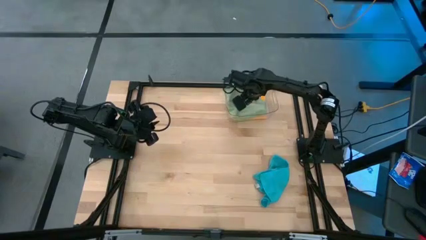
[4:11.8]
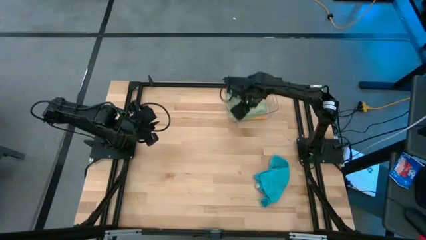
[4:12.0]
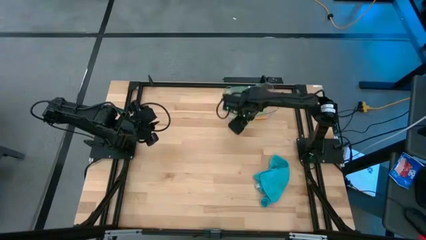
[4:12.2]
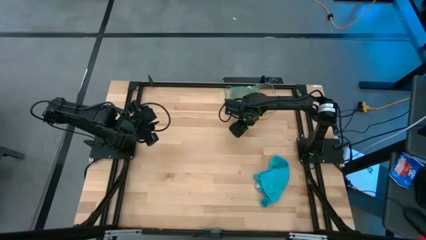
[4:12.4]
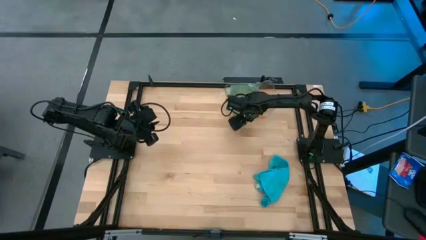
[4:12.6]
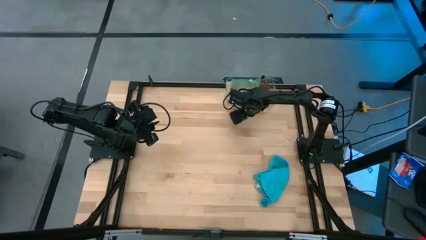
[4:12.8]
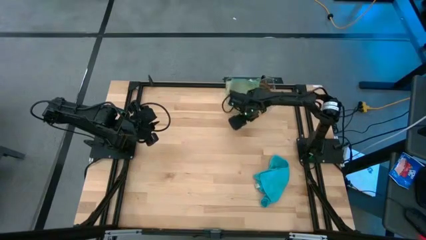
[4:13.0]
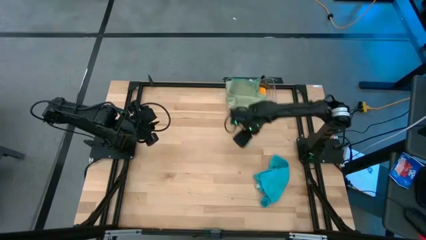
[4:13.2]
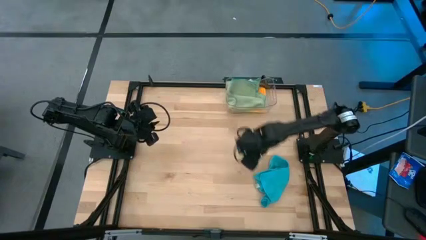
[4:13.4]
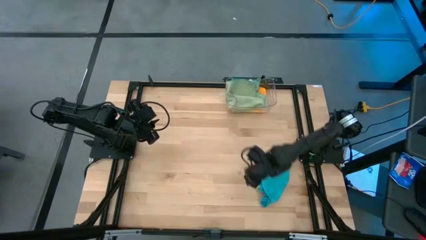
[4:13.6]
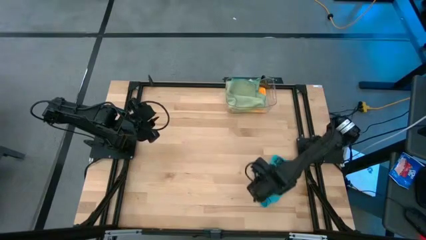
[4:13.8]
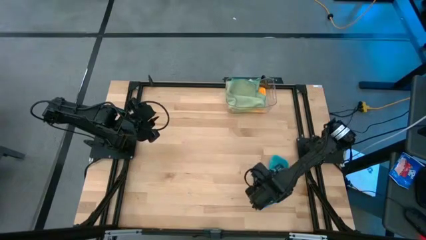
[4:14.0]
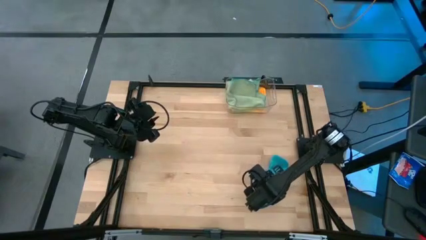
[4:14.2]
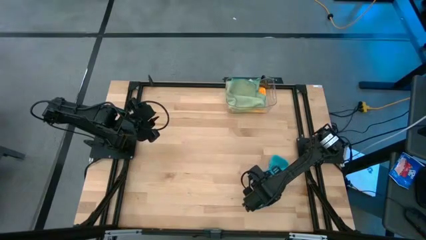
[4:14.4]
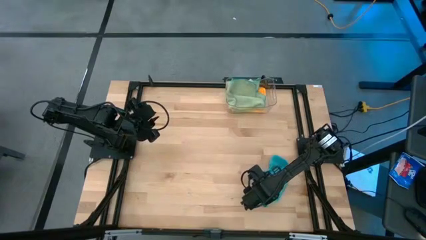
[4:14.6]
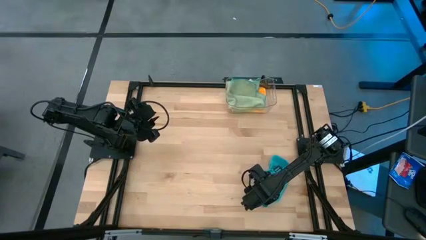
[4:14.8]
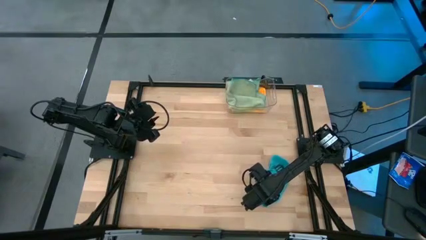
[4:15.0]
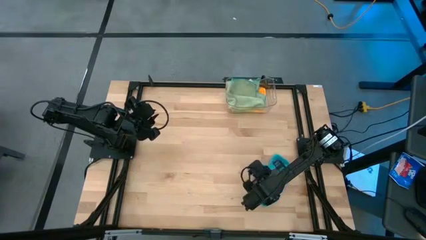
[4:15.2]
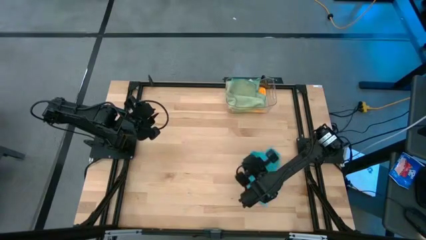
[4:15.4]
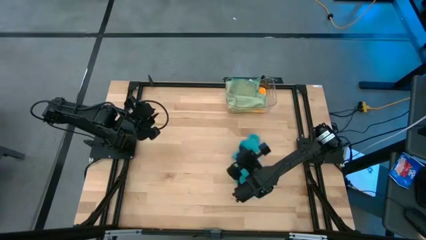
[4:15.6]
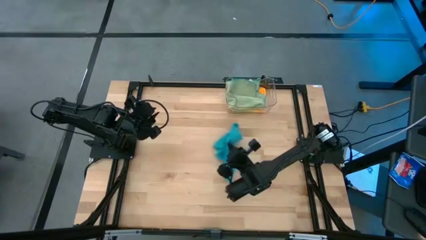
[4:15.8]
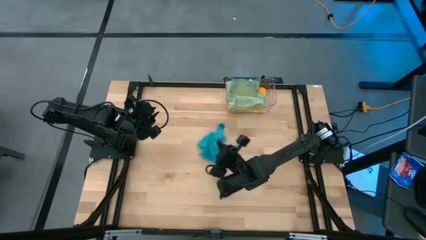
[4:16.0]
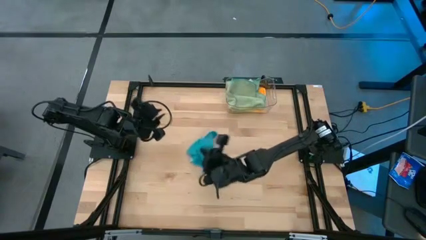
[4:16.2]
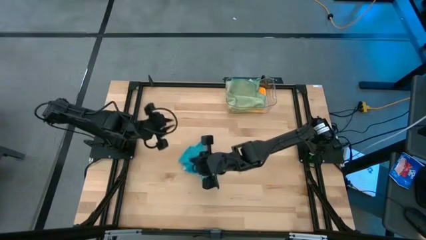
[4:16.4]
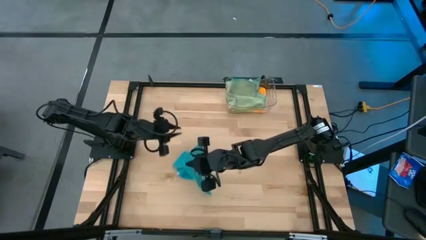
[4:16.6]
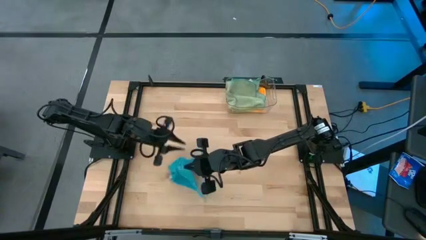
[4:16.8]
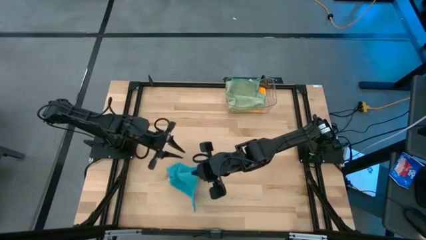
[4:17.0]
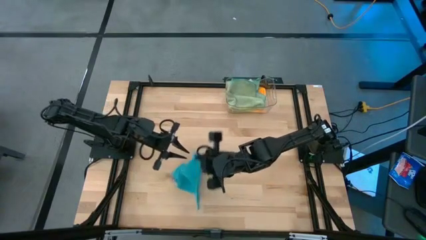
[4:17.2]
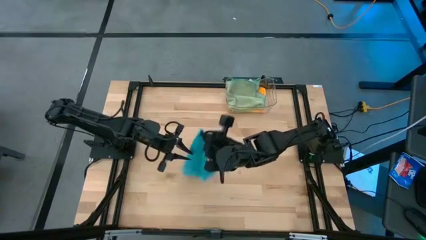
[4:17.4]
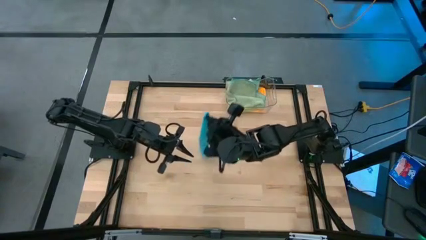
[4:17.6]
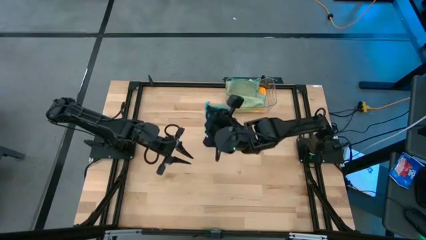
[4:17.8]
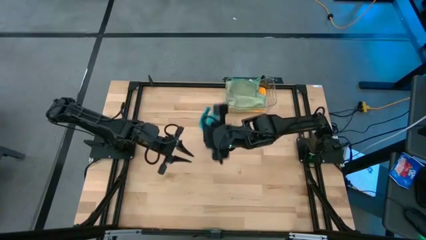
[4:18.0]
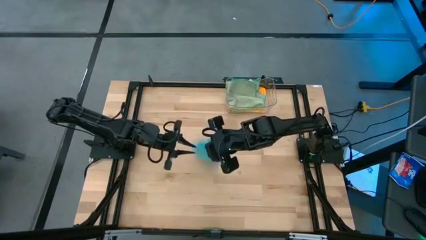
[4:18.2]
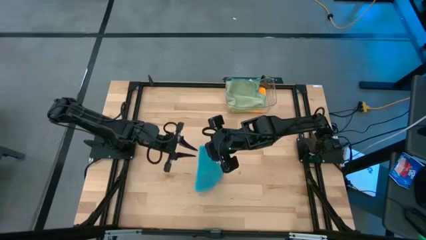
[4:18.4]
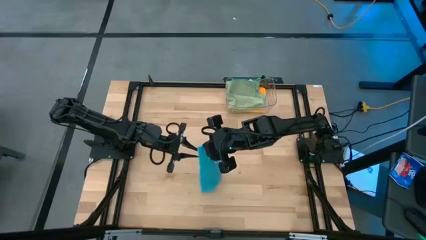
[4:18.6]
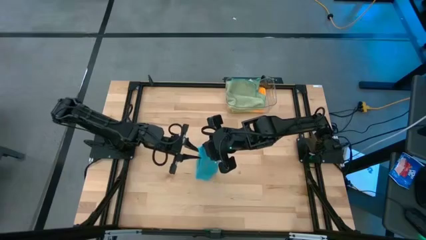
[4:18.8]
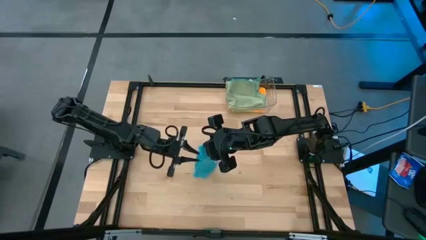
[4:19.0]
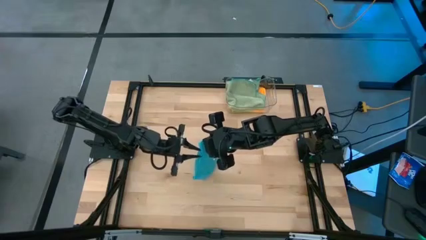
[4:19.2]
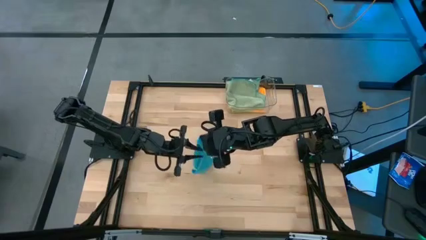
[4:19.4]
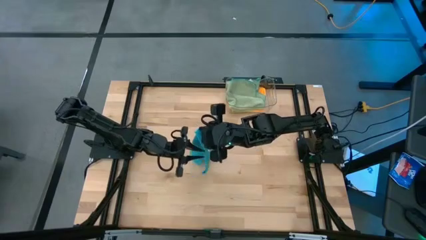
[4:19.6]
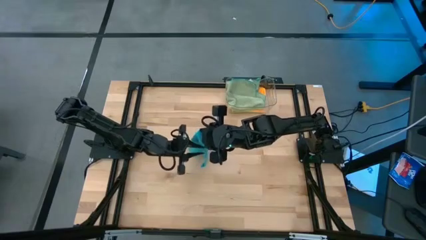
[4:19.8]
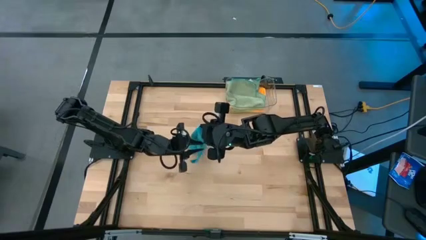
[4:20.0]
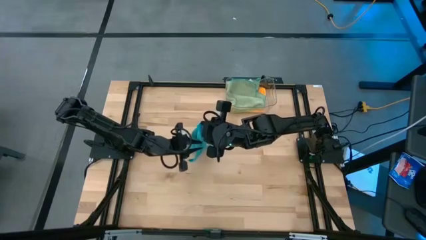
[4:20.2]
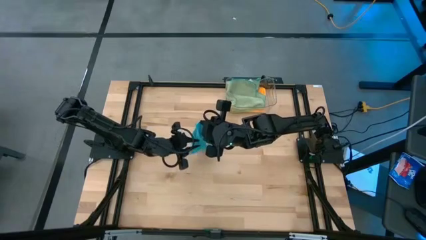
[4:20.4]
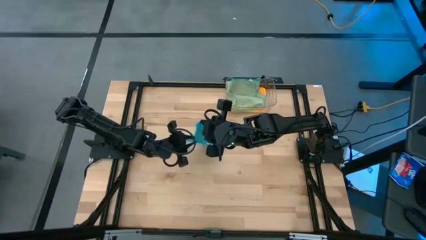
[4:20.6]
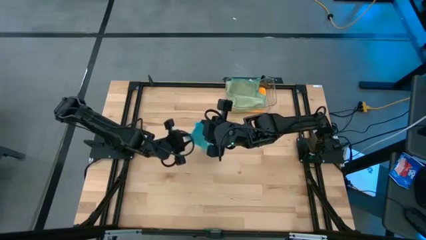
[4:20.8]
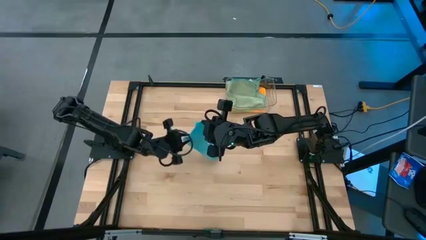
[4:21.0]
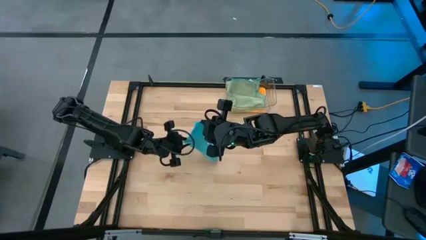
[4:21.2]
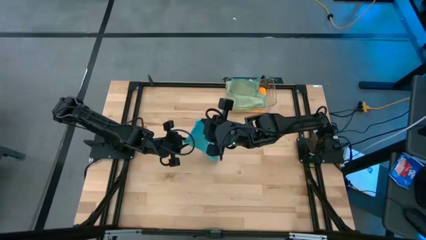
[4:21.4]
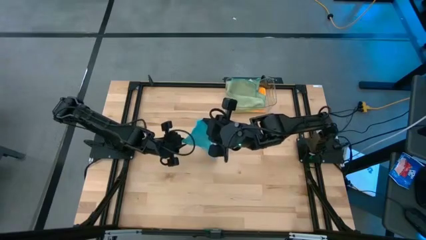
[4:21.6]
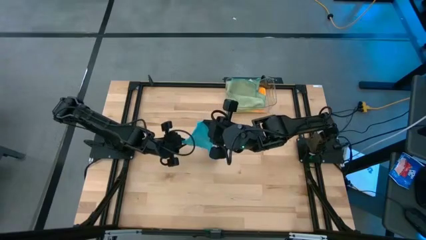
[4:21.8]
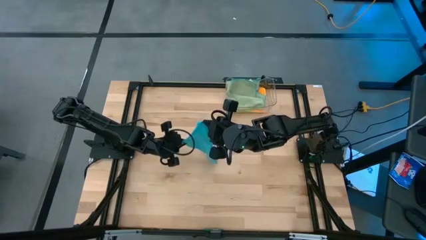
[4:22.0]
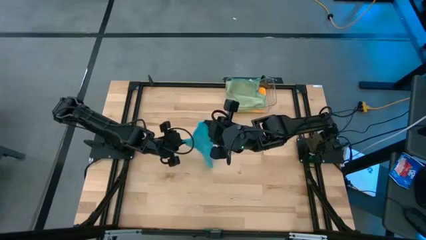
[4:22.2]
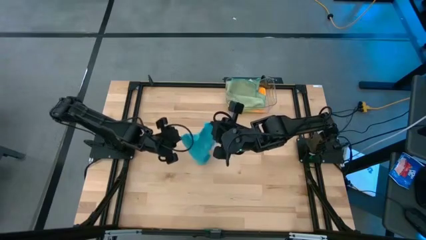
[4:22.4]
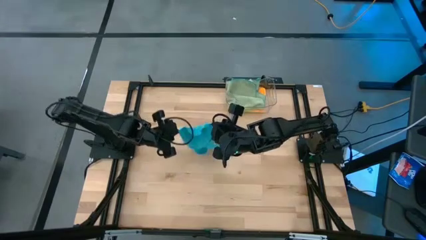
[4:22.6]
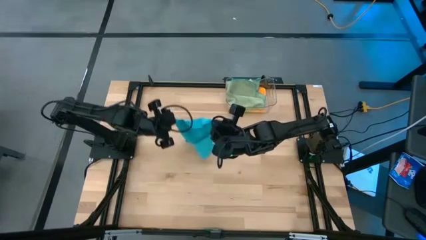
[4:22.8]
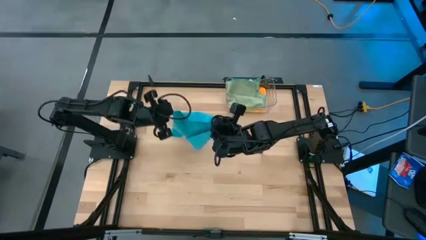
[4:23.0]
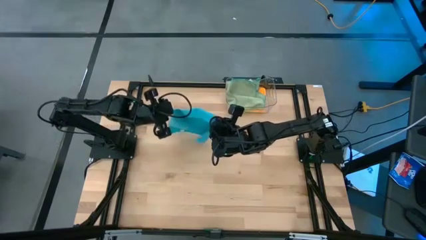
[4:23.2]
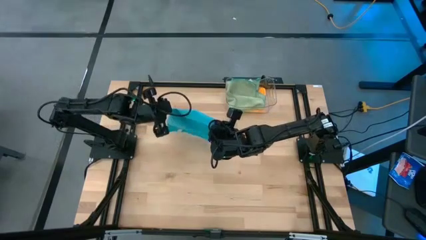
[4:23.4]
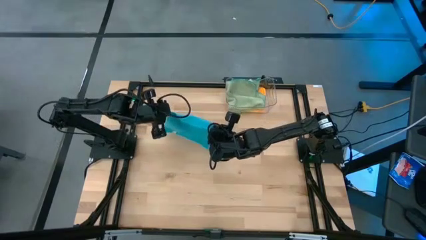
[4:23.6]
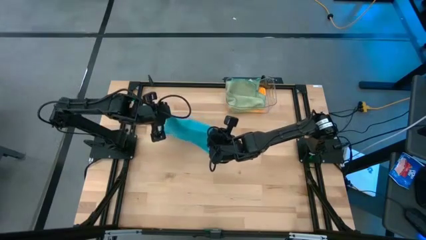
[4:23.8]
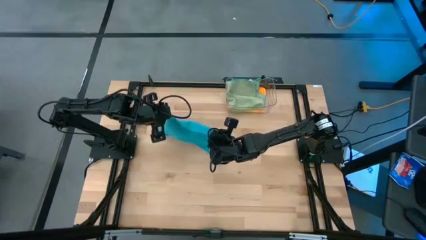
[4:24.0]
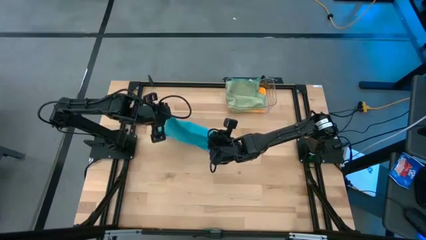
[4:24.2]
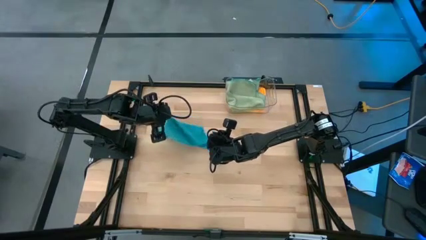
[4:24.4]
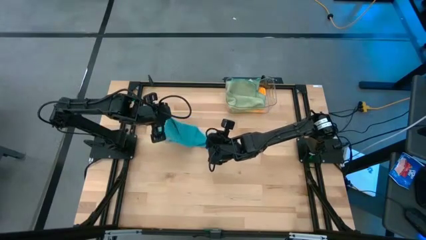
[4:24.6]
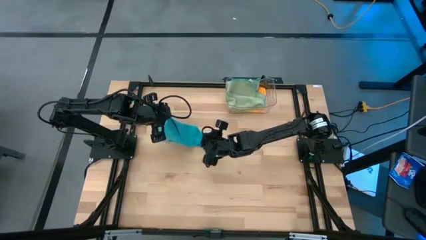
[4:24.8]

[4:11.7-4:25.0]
Task: Fold microfiber towels
Fold the blue microfiber towel

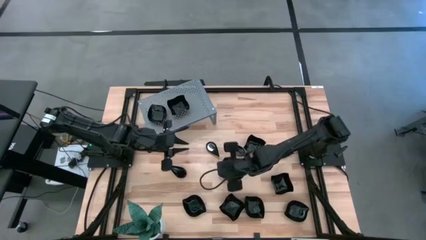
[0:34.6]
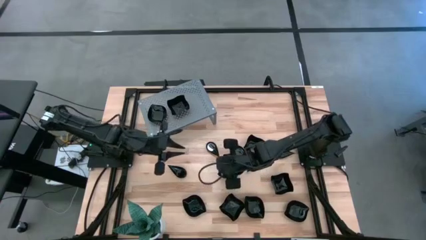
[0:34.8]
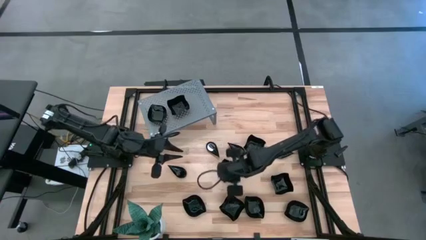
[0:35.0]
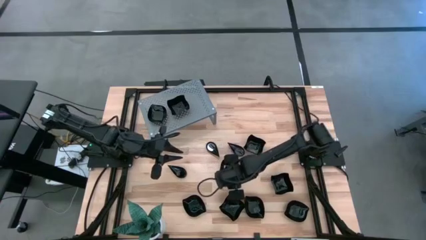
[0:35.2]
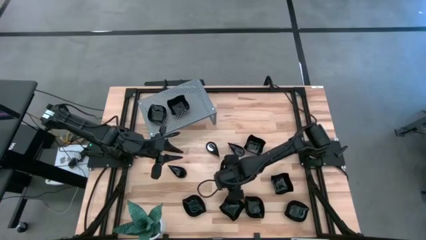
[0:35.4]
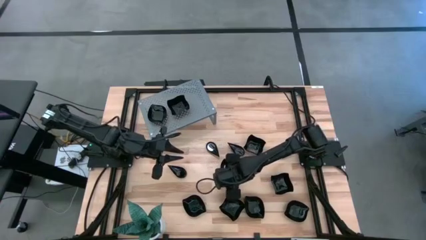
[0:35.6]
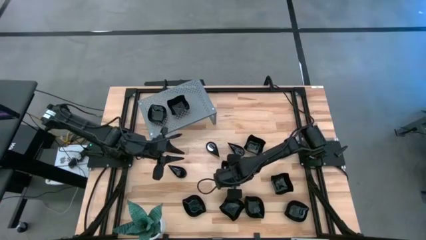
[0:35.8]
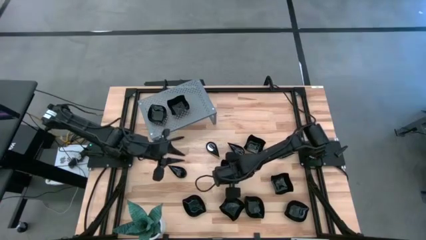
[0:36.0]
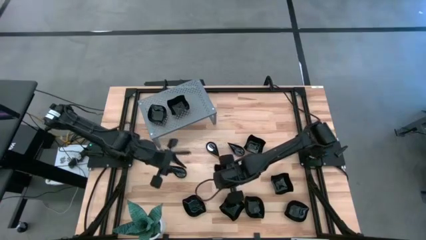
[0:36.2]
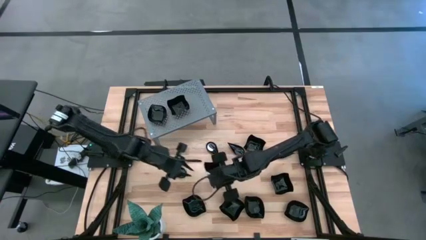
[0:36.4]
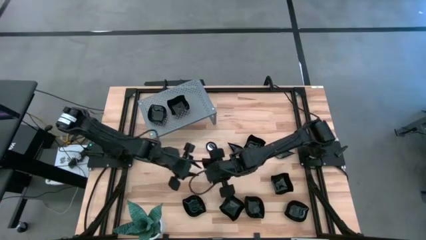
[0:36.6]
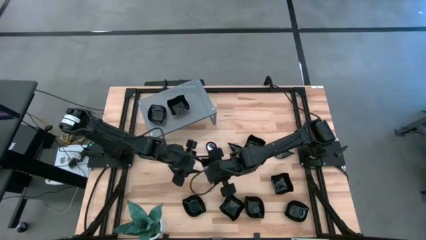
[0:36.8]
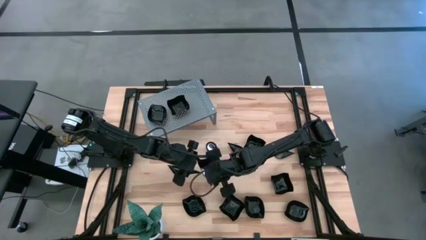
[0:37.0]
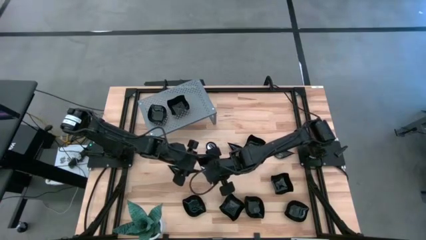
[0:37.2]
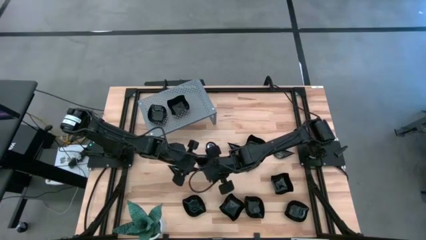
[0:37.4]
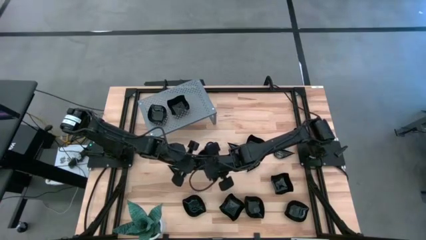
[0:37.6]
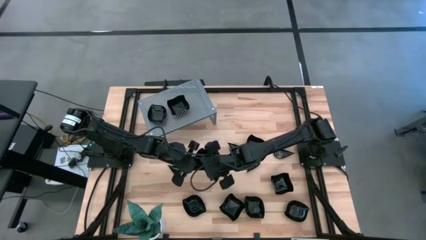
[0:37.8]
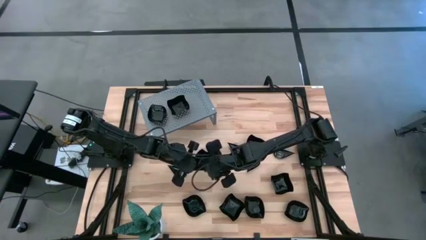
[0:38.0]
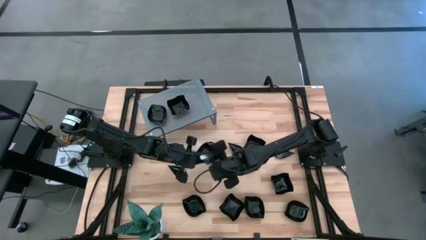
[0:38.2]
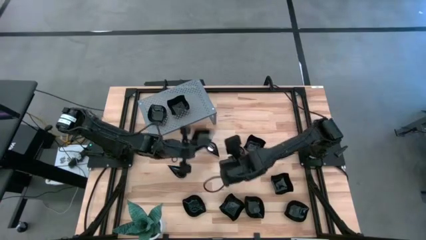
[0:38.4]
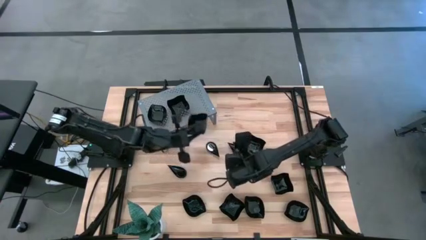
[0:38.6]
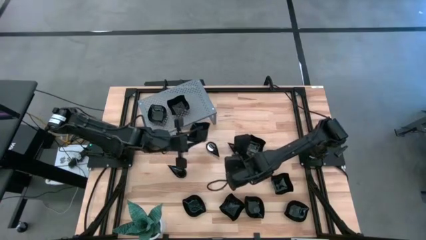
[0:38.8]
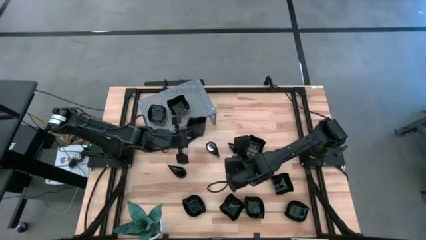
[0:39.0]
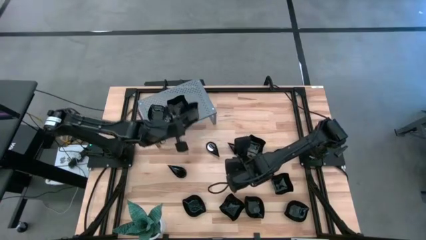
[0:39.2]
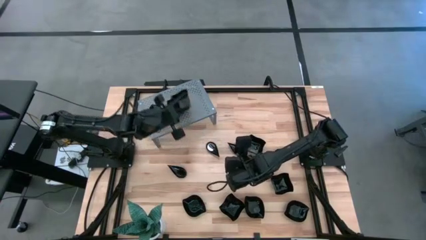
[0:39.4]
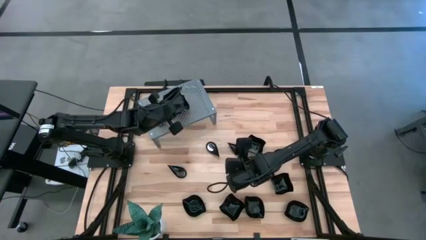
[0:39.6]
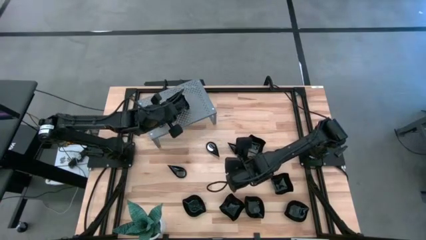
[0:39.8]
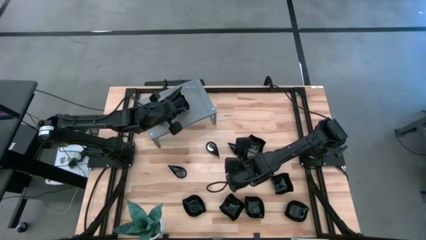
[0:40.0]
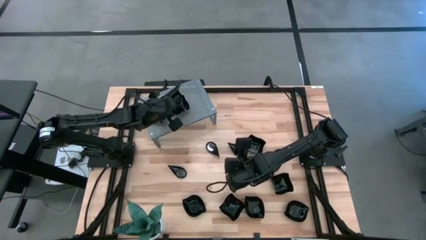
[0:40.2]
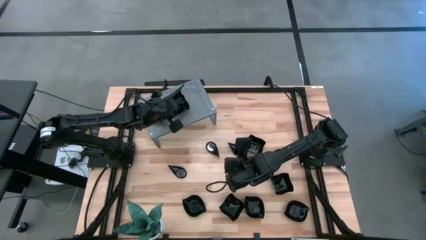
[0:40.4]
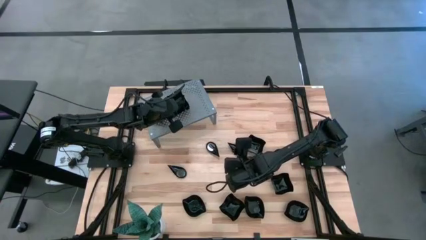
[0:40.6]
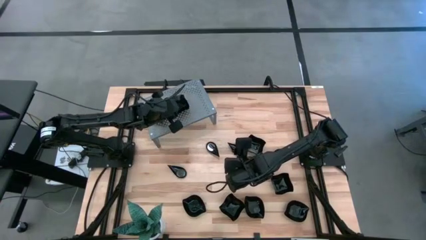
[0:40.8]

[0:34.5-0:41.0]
Task: Pick & Place Mini shaped plates
Stack the black distorted square plate on top of the black distorted square plate on the shelf
